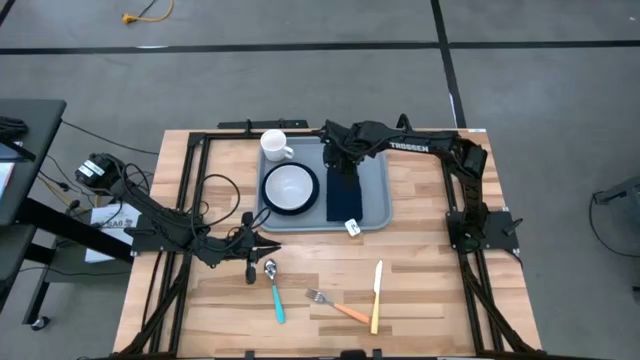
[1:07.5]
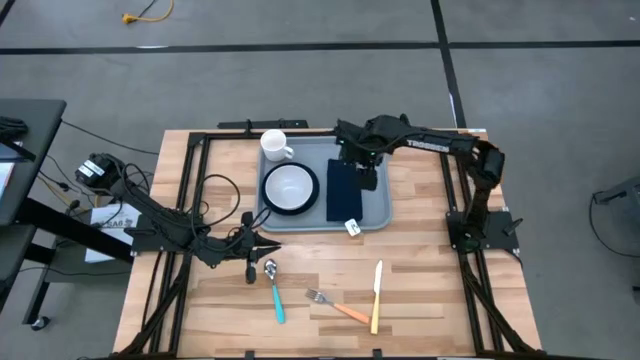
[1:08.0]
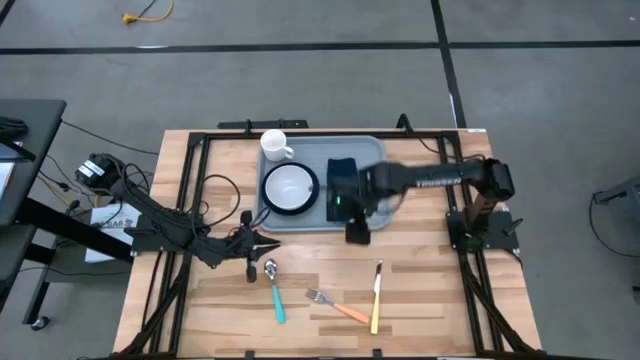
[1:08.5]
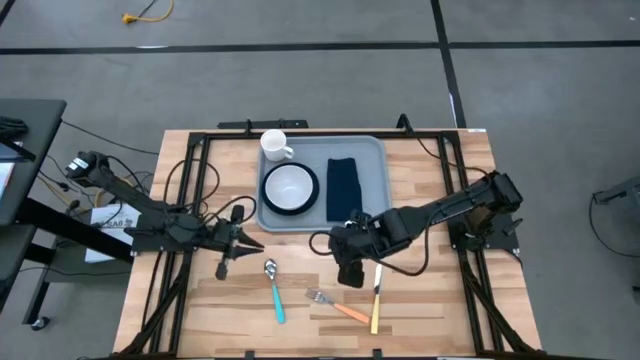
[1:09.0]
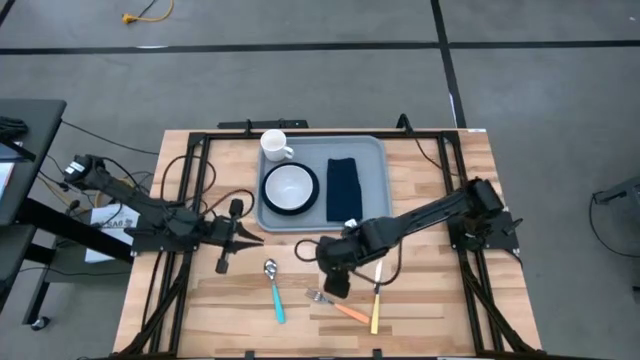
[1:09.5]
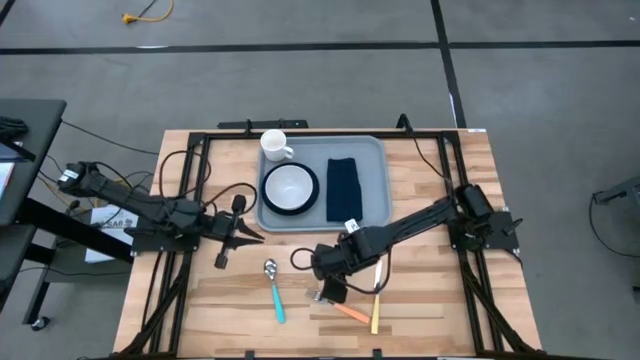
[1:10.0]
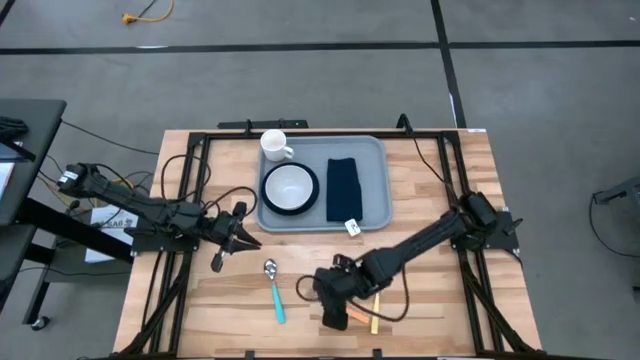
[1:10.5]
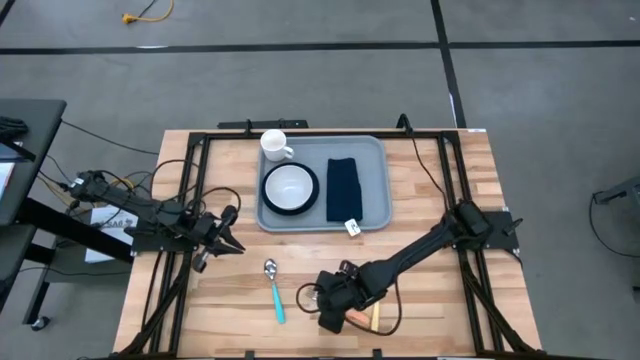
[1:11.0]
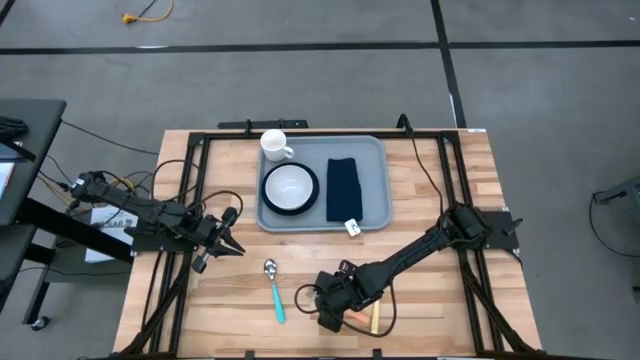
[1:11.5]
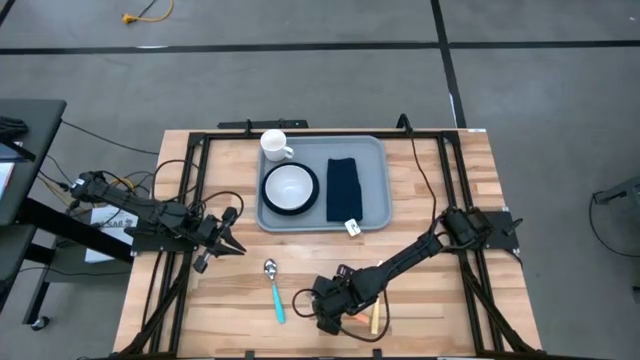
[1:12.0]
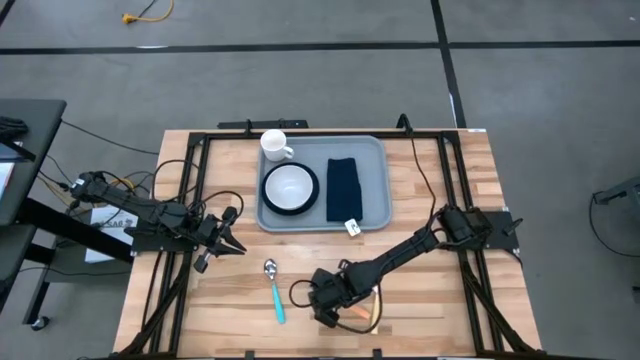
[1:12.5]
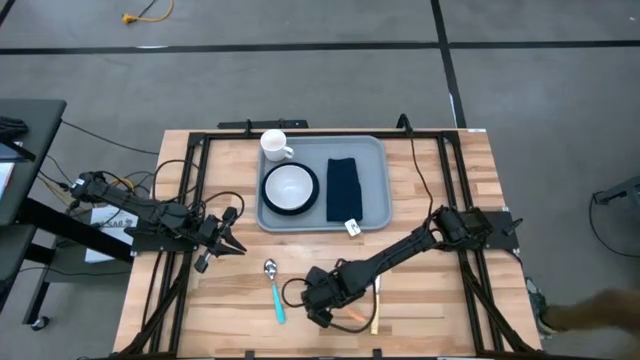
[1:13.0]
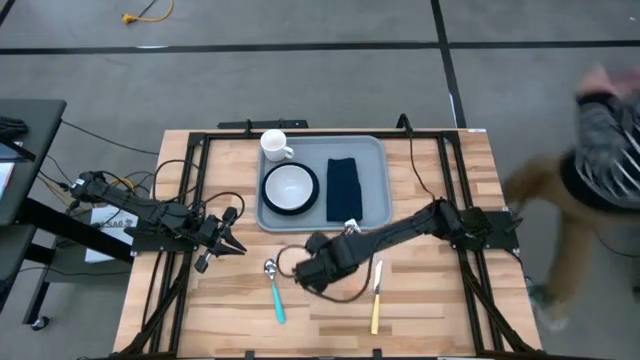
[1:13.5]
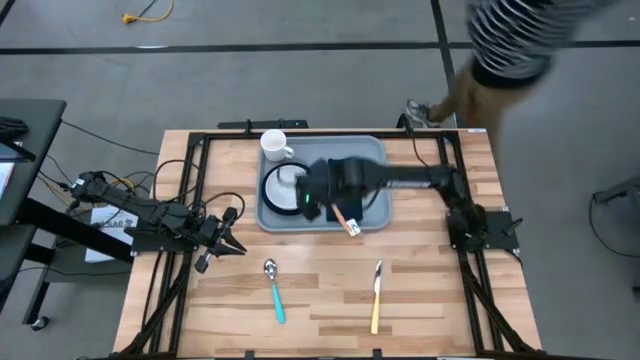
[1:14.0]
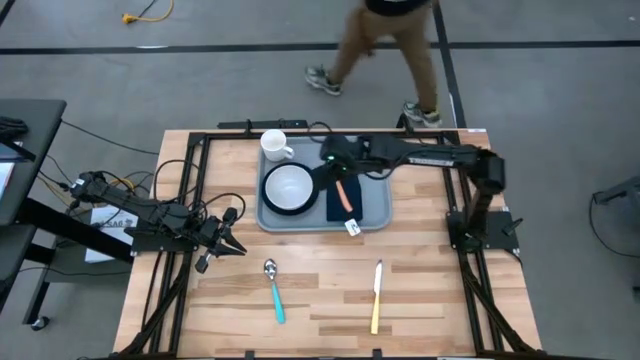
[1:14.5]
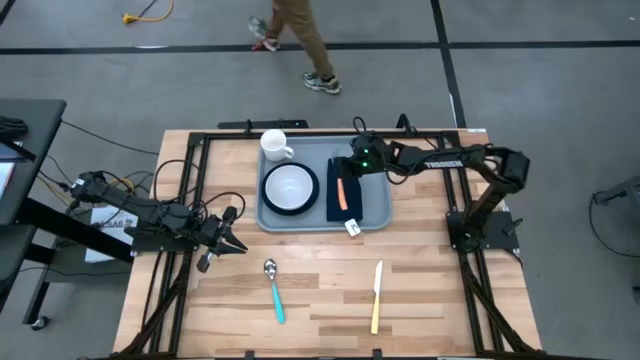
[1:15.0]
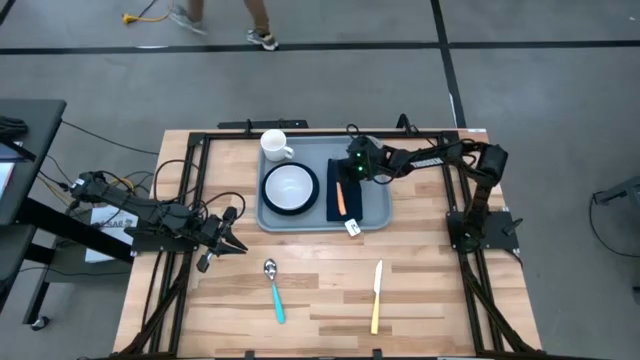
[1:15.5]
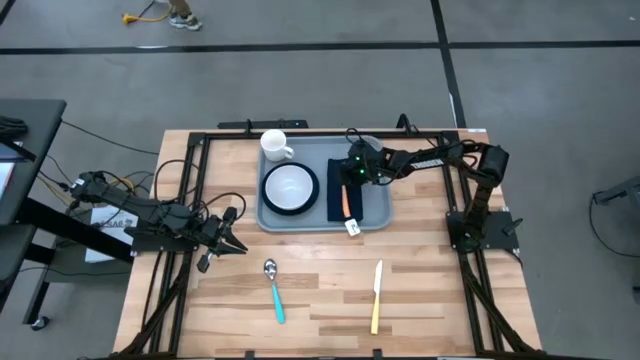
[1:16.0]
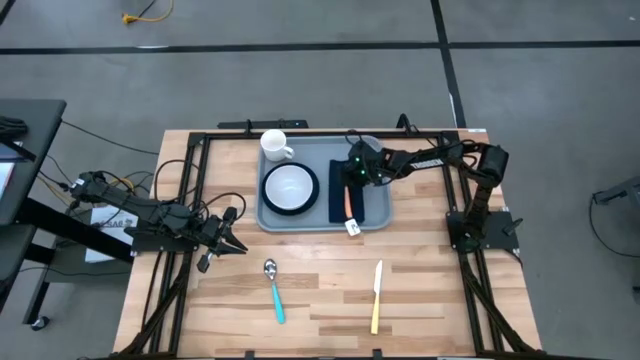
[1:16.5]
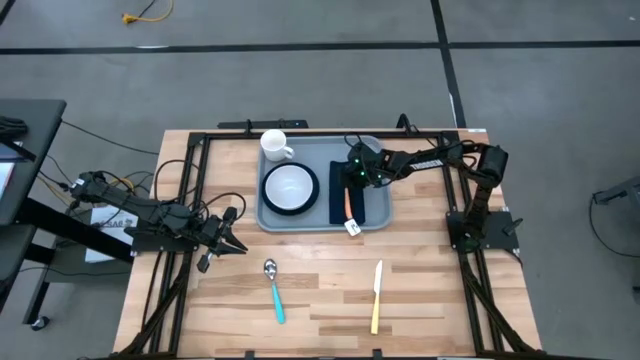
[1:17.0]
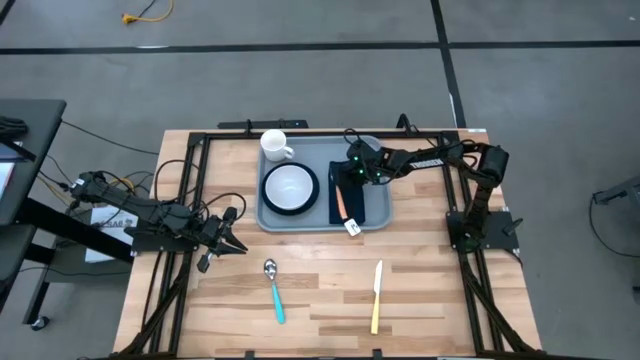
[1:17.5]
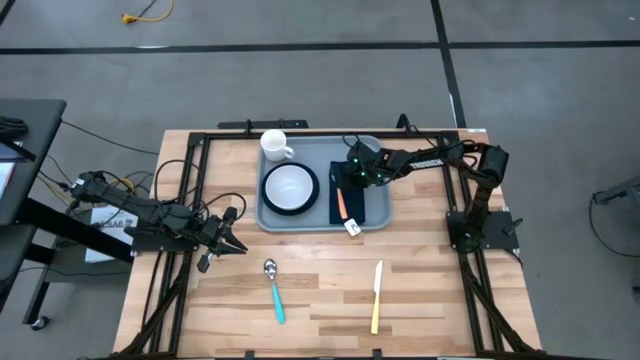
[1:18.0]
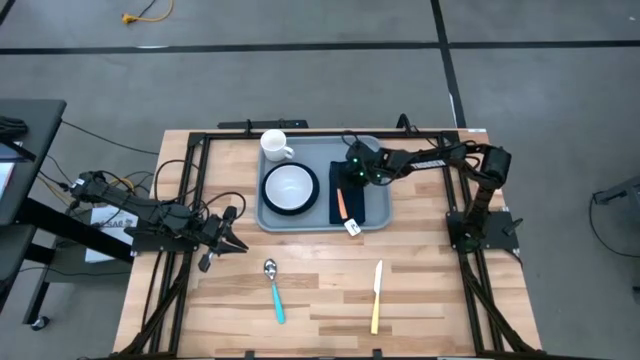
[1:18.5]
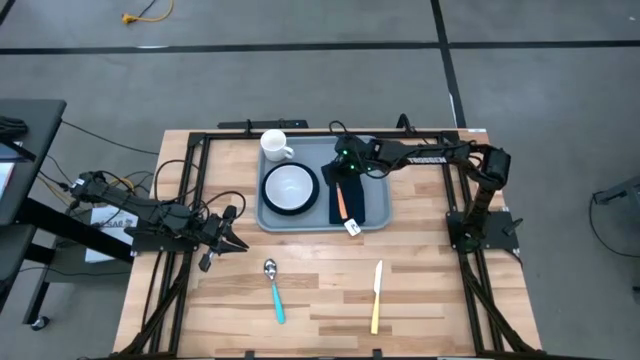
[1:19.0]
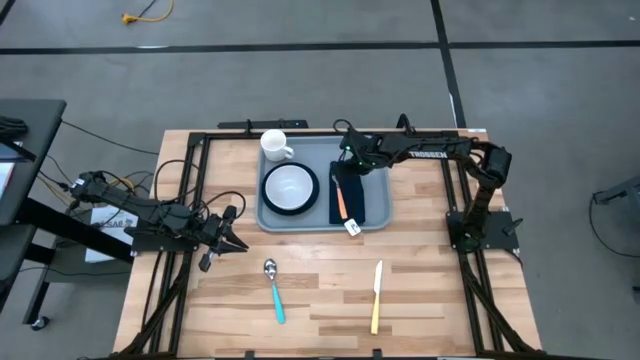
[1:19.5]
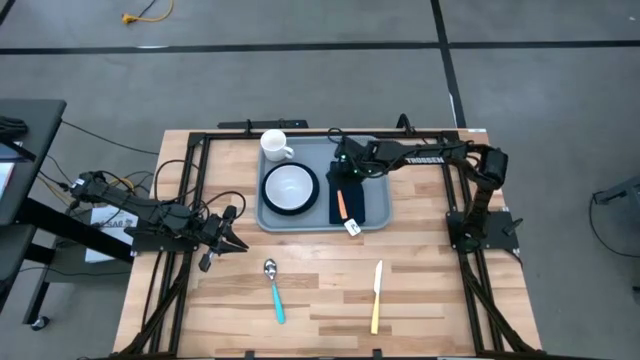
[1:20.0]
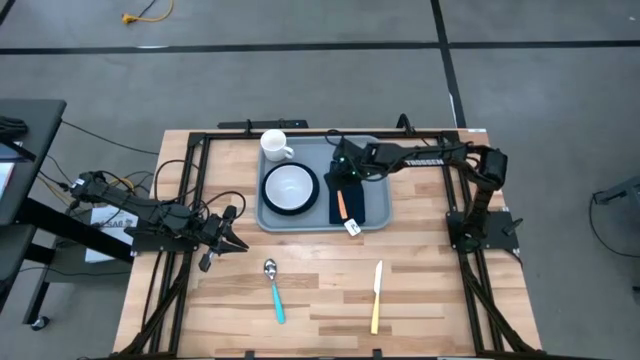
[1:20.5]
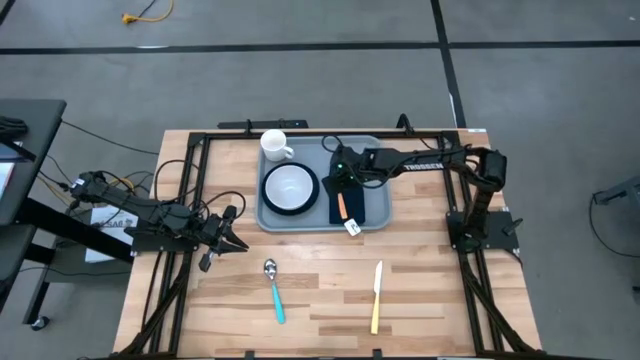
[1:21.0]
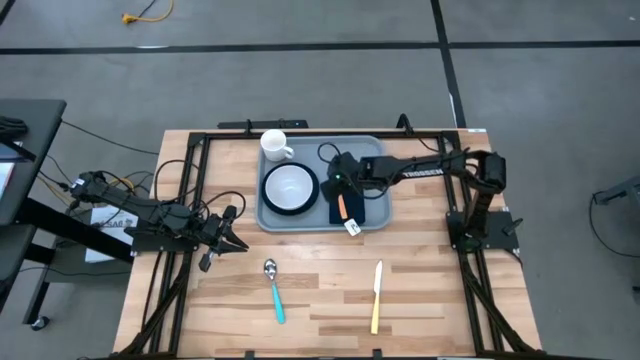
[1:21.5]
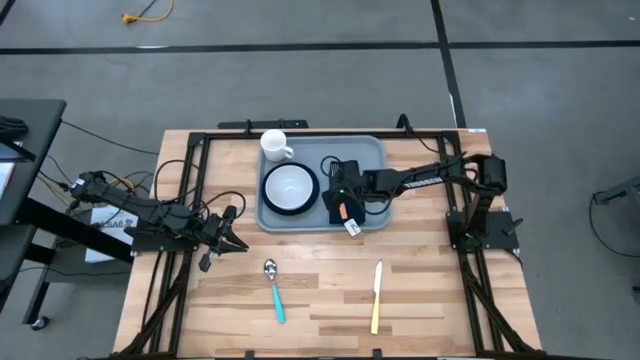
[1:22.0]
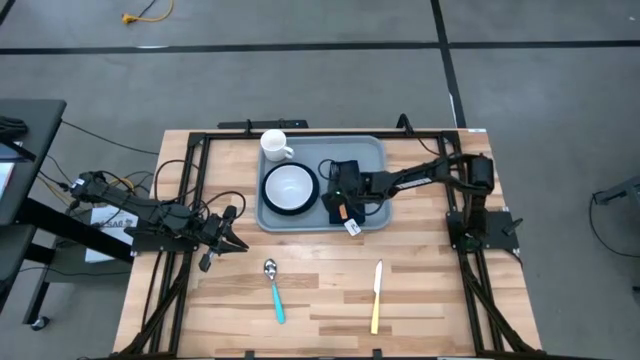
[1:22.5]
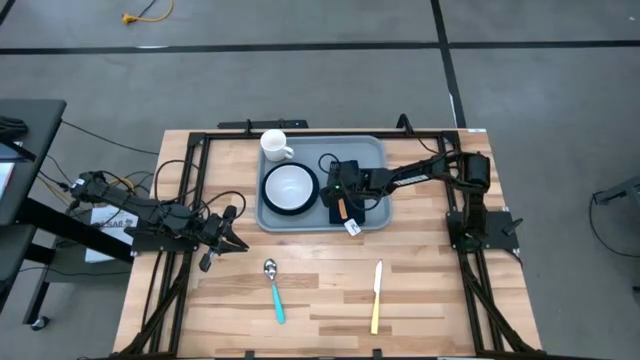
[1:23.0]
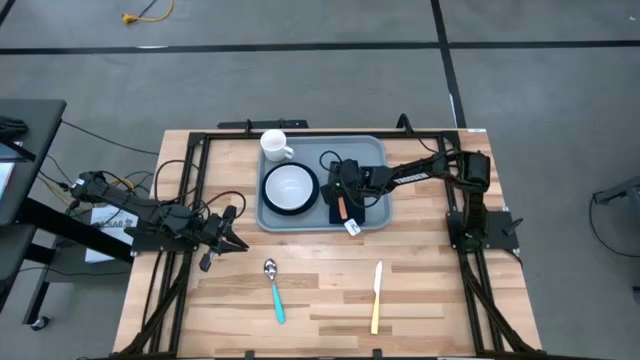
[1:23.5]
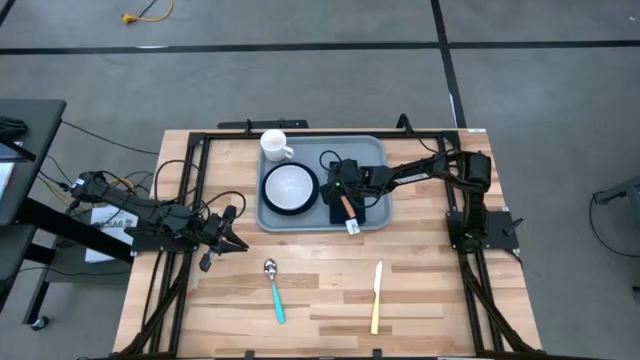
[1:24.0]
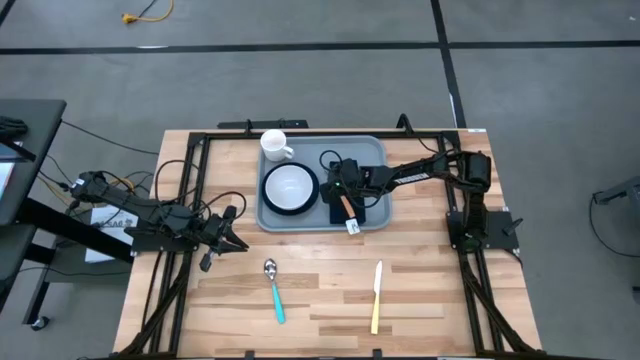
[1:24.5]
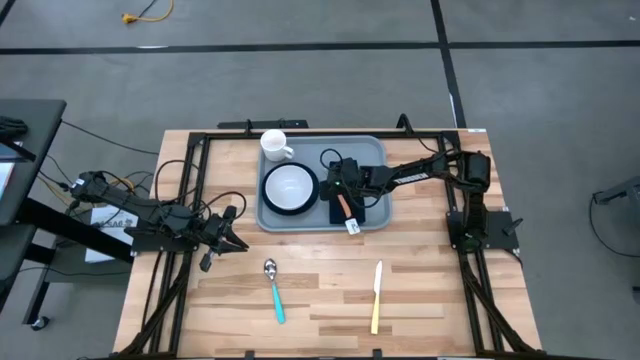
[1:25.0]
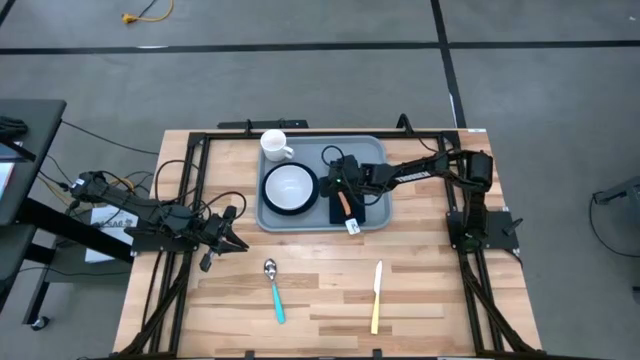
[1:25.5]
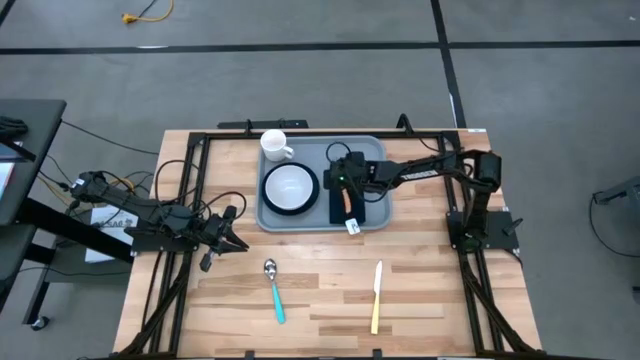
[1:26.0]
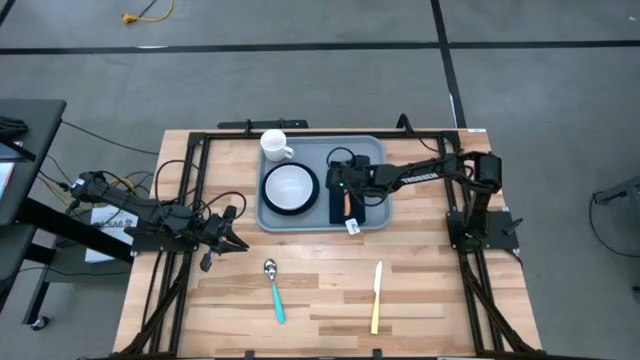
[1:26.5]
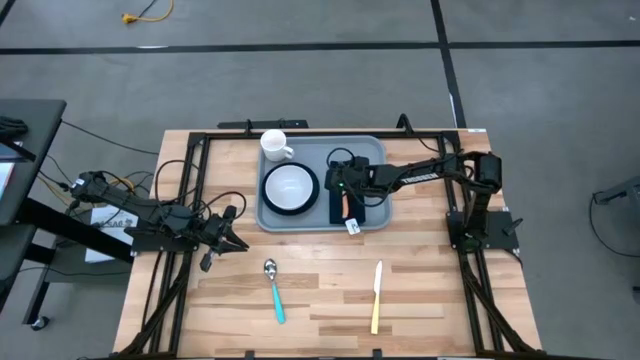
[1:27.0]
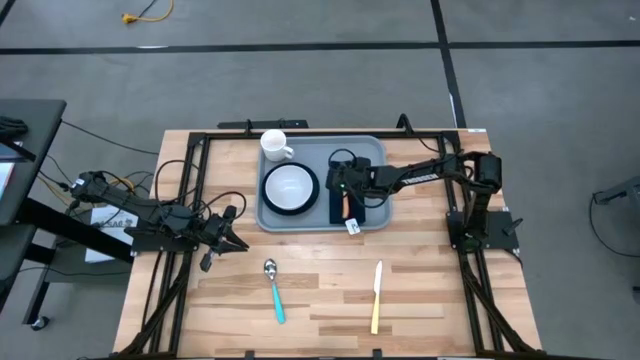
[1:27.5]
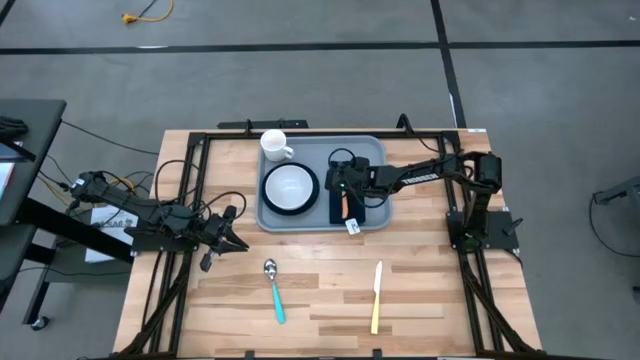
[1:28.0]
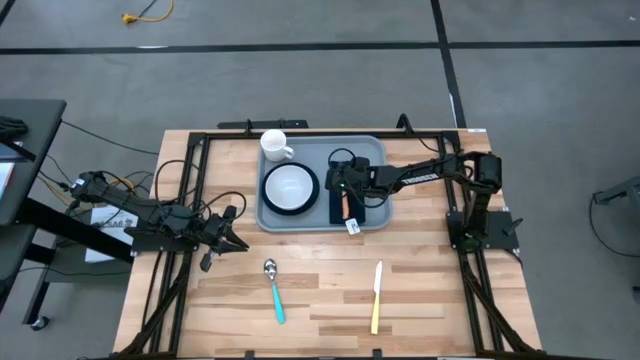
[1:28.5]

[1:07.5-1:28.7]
Task: Set up tray
Put the orange fork on the dark blue napkin
